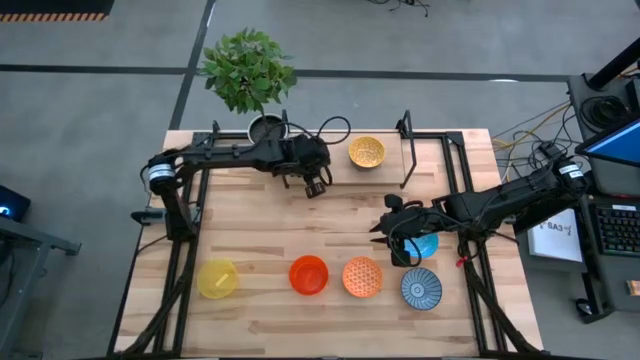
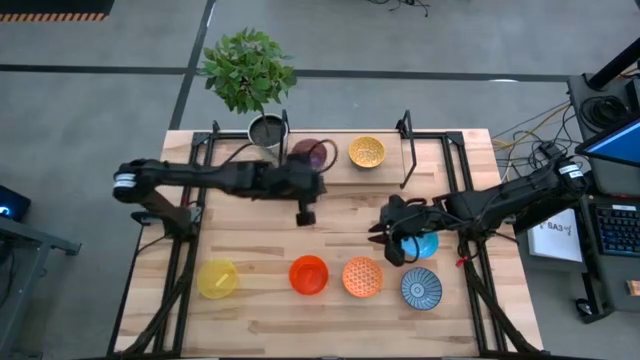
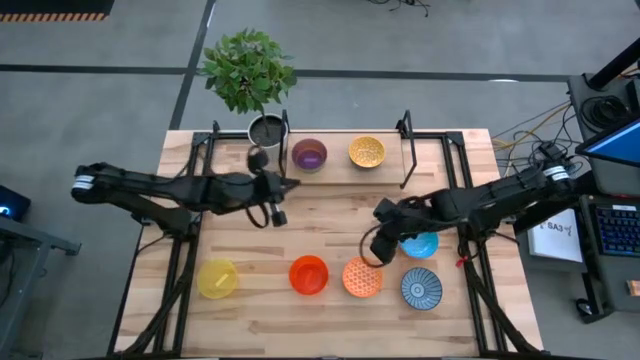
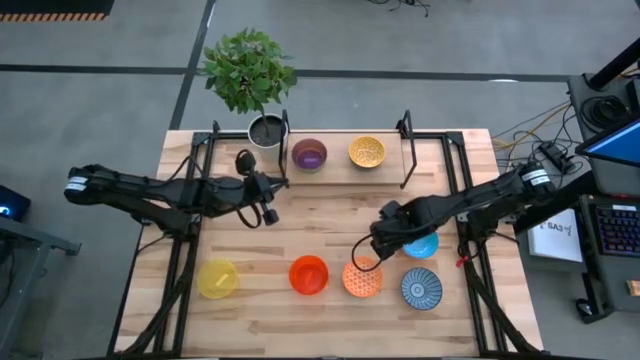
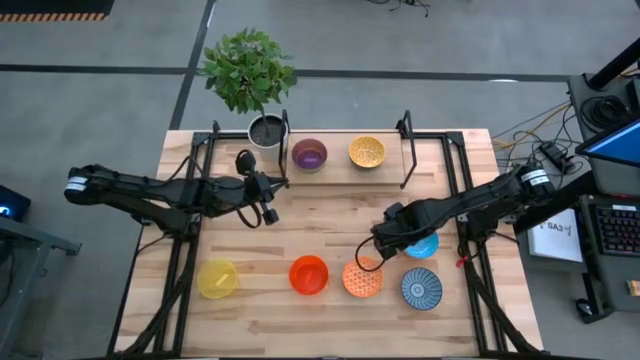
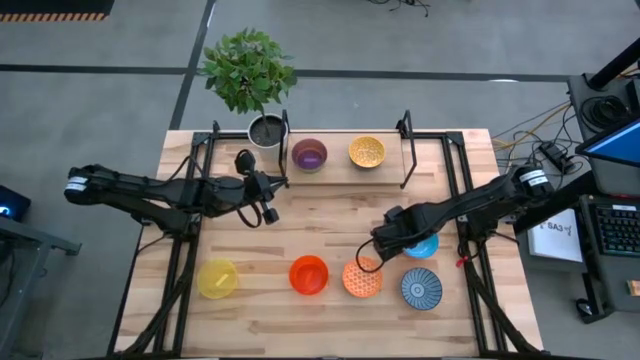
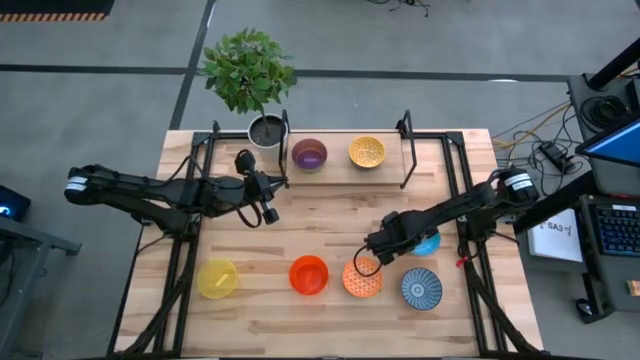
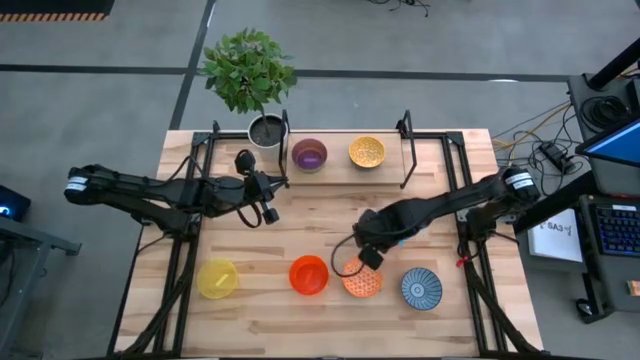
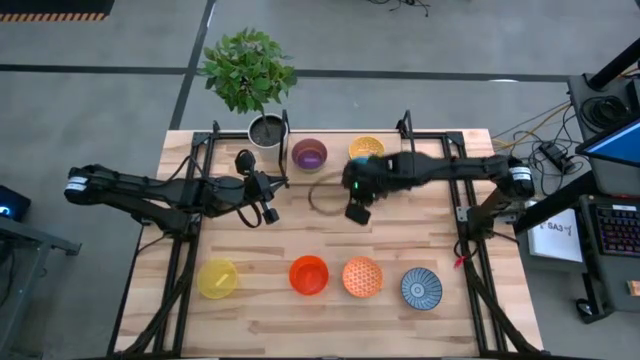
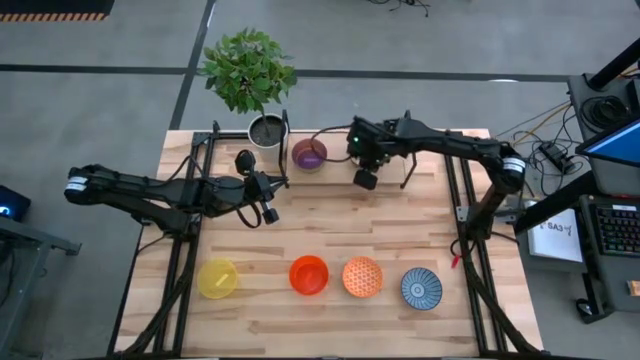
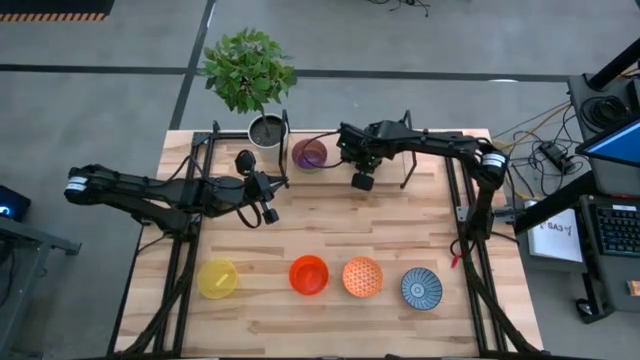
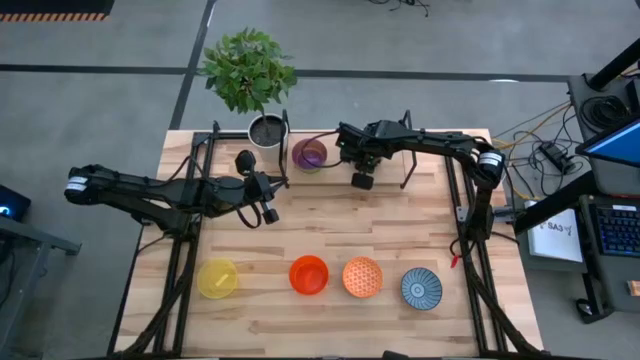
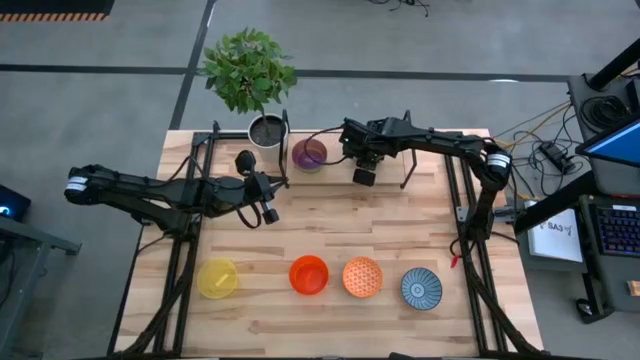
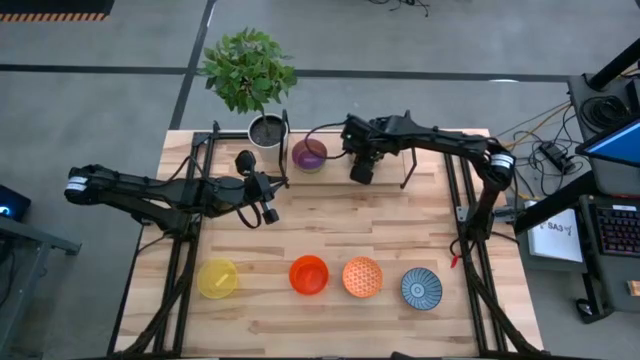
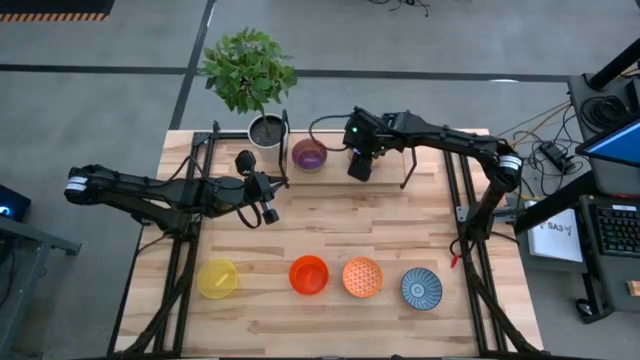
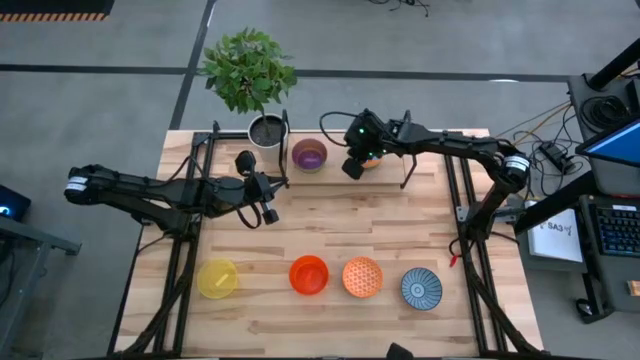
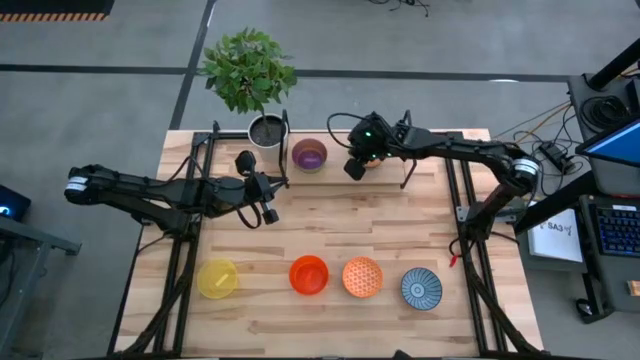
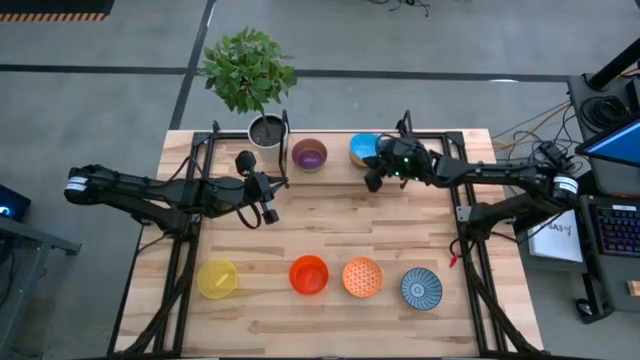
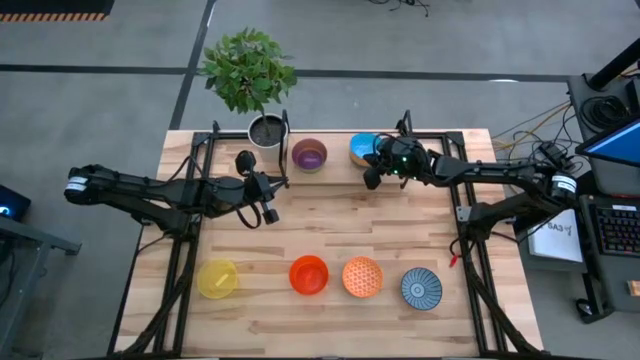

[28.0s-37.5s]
Task: Place and stack bowls onto a shelf
Stack the light blue bowl on top of the yellow bowl on the shelf

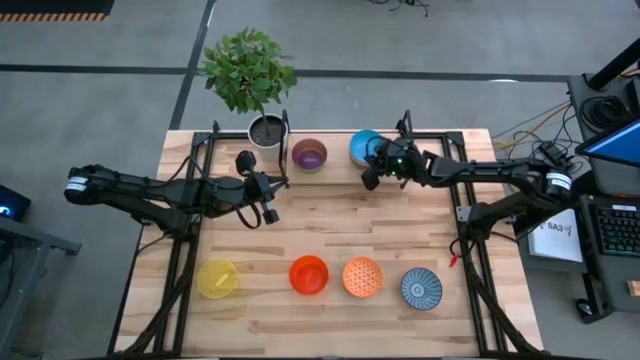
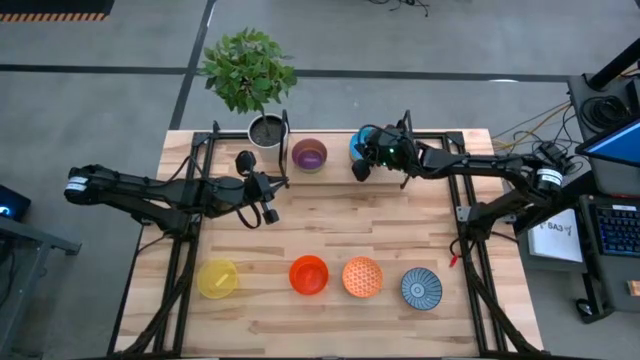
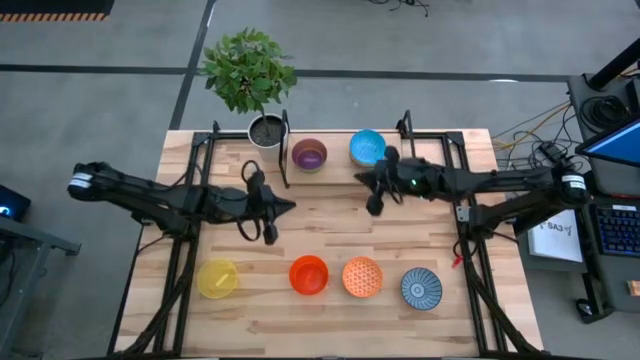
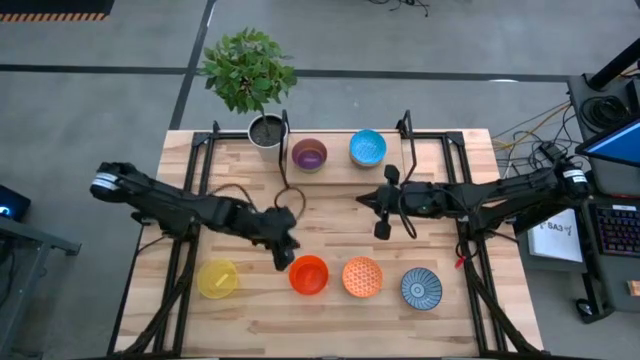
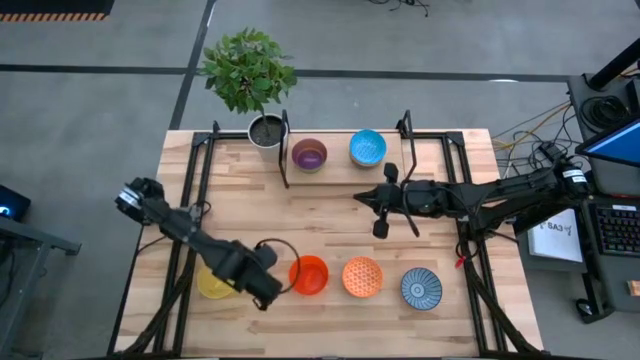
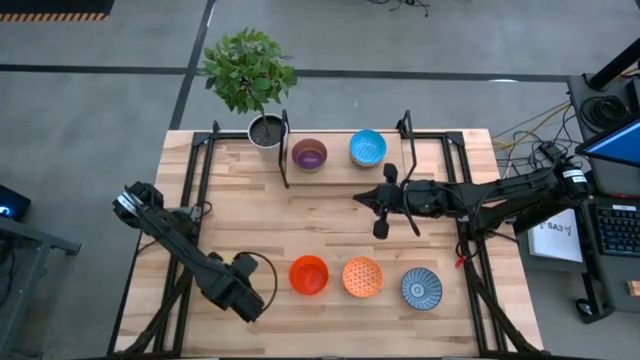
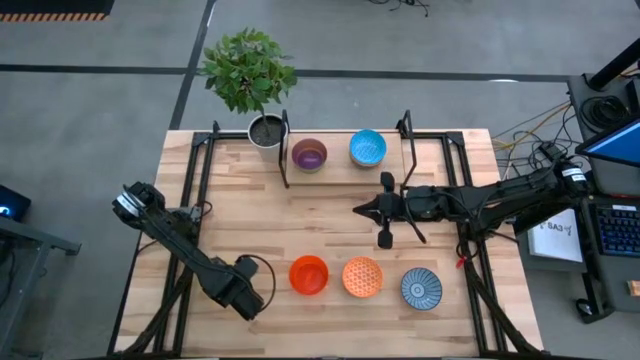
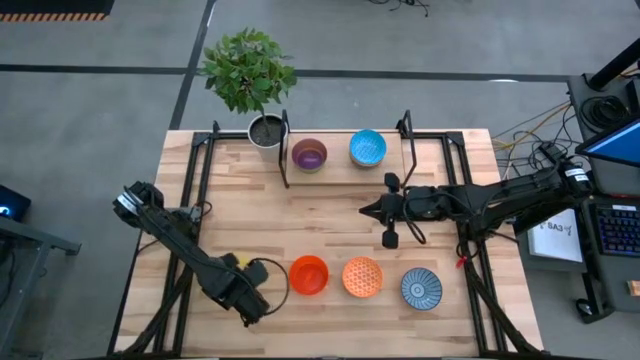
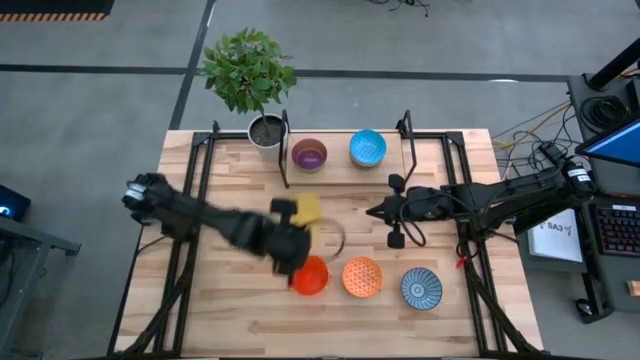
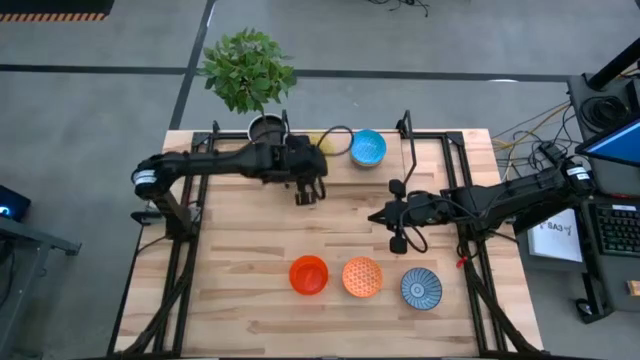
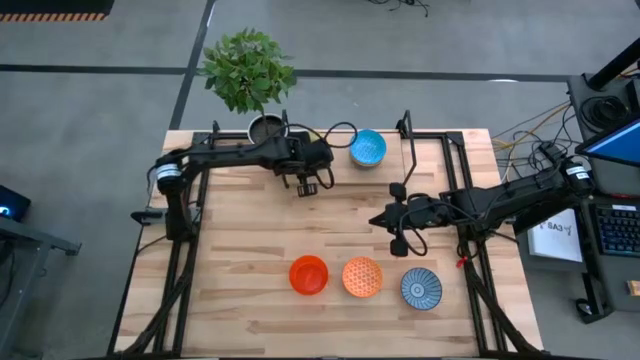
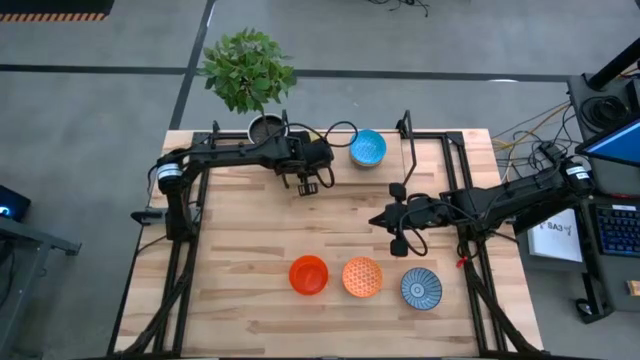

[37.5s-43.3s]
Stack the transparent yellow bowl on top of the purple transparent bowl on the shelf

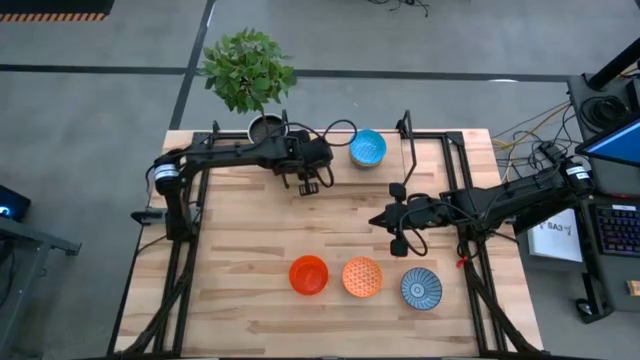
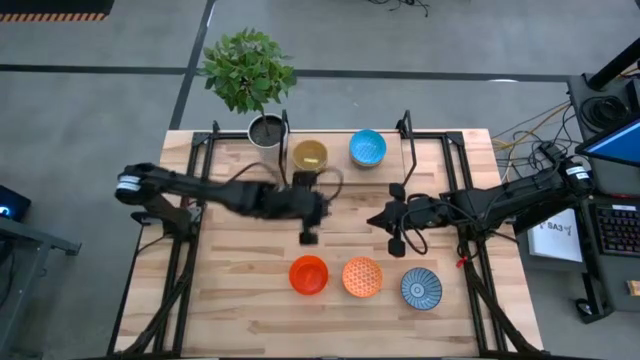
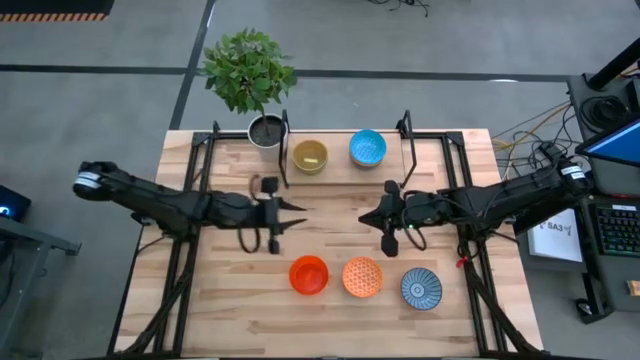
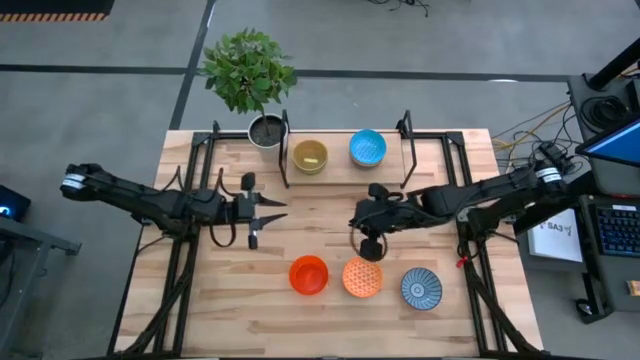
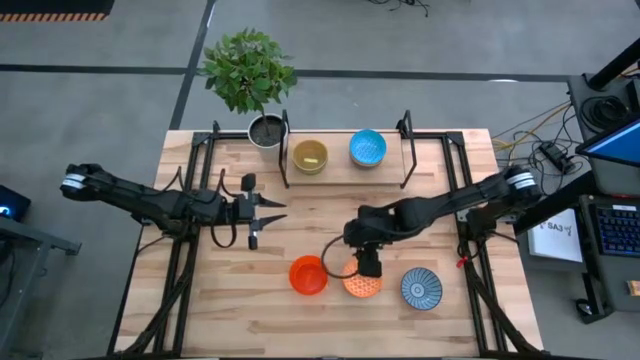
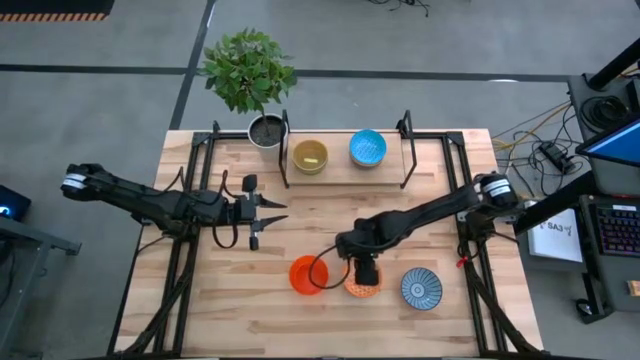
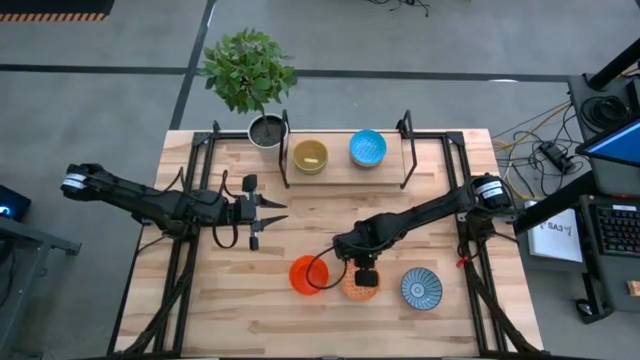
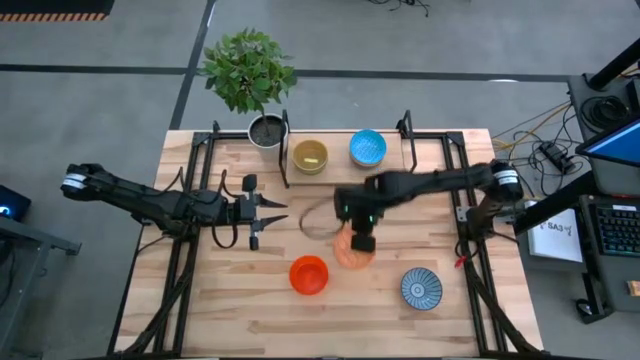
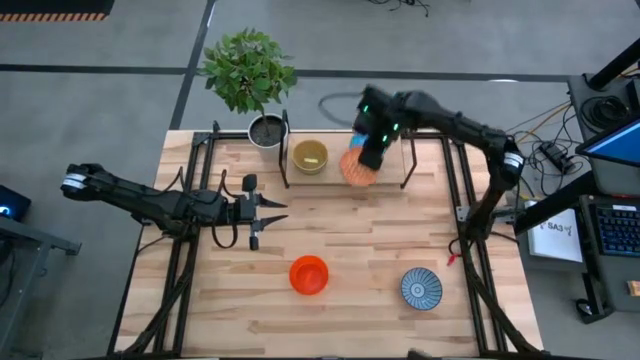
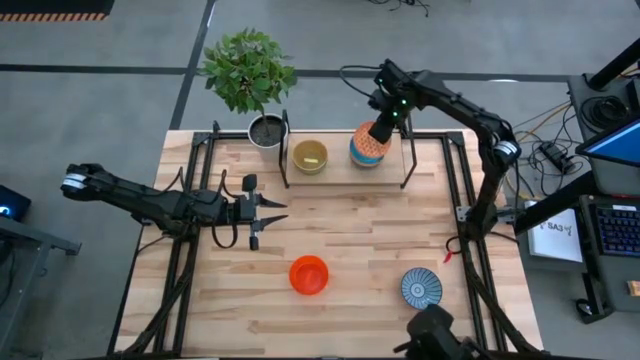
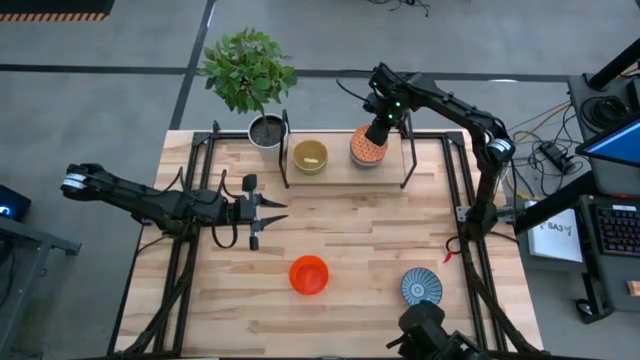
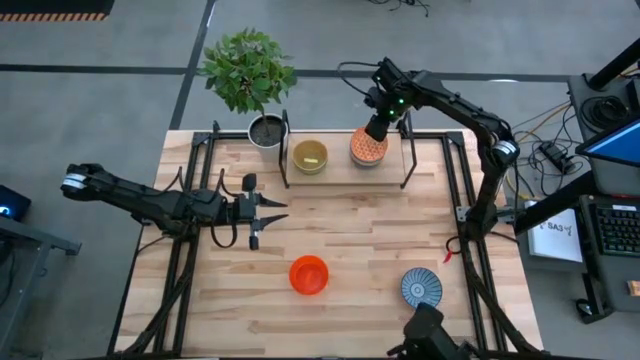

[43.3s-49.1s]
Stack the orange bowl on top of the light blue bowl on the shelf
